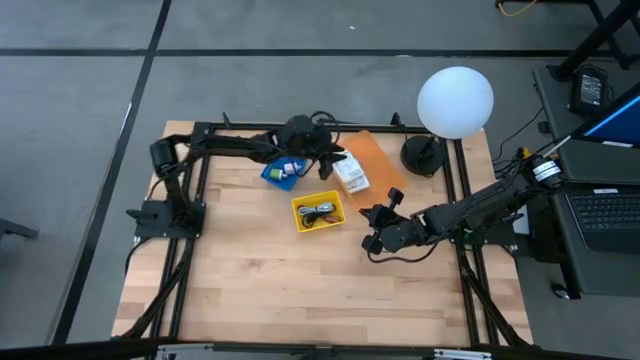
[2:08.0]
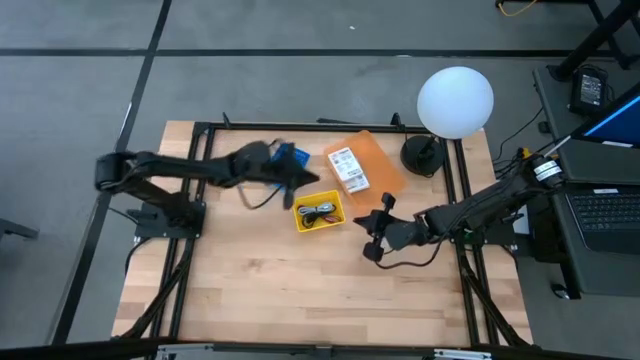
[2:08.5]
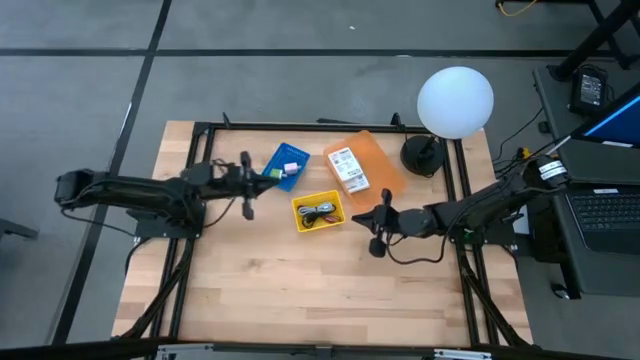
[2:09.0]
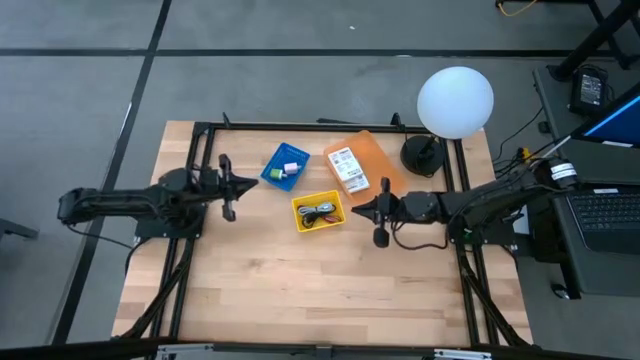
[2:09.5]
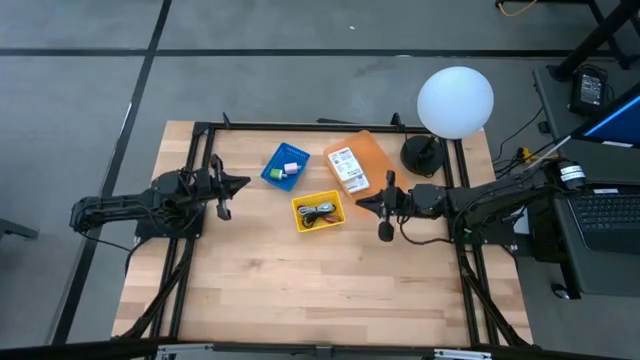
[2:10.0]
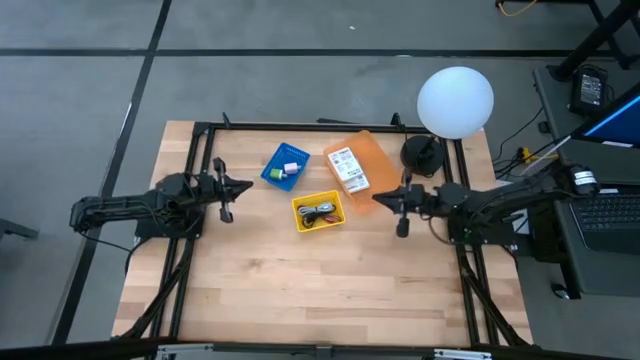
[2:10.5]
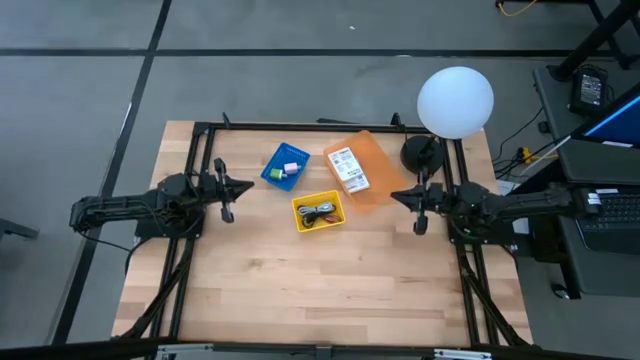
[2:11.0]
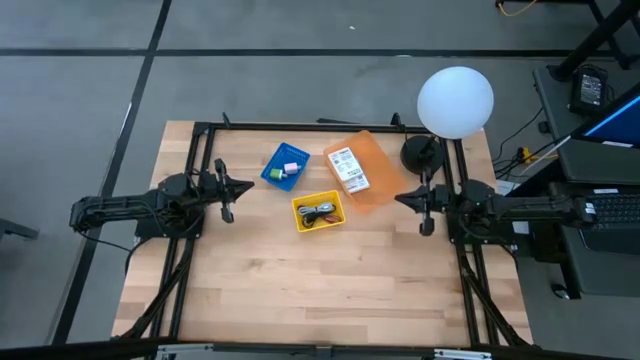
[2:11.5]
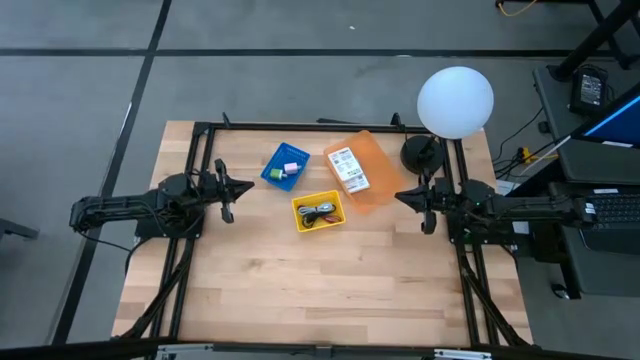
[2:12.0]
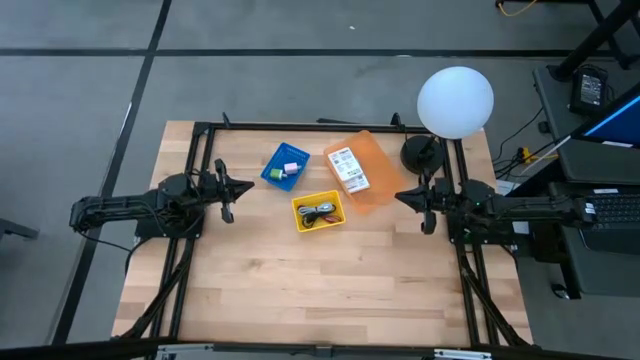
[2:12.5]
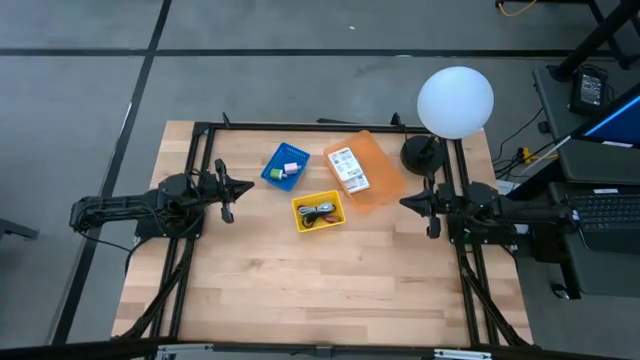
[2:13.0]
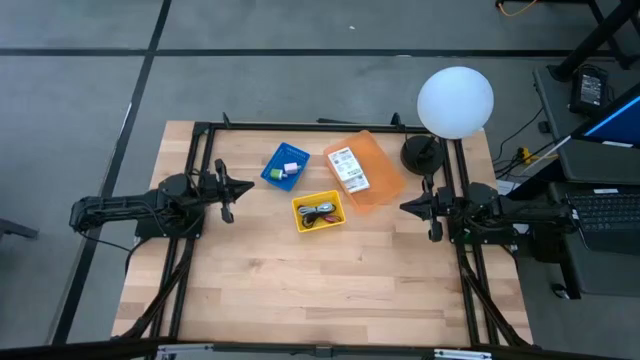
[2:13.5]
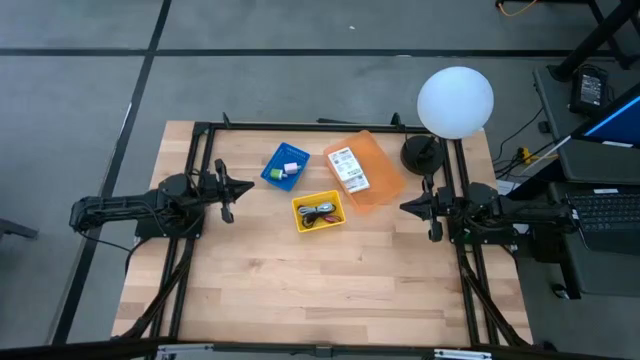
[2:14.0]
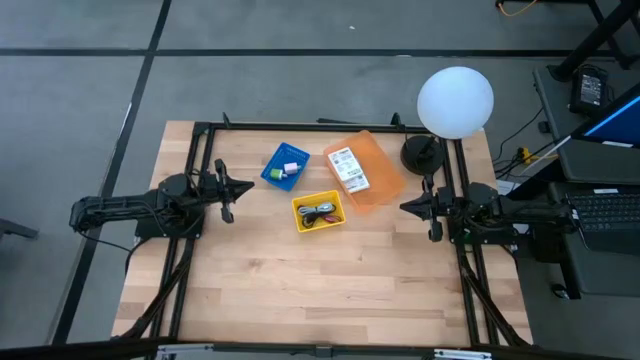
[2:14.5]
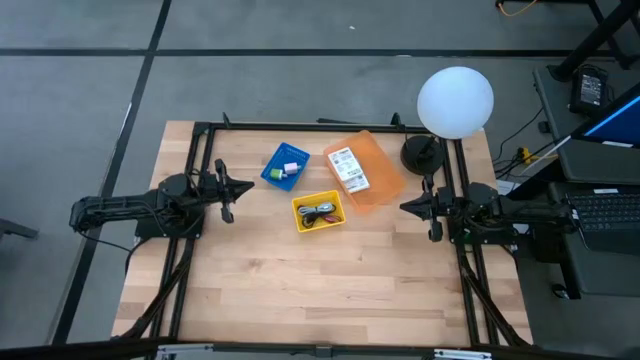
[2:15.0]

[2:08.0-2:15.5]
Task: Pick and place items into bin
Return to Home Position

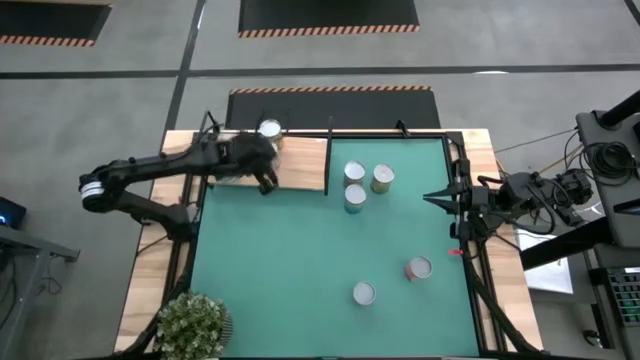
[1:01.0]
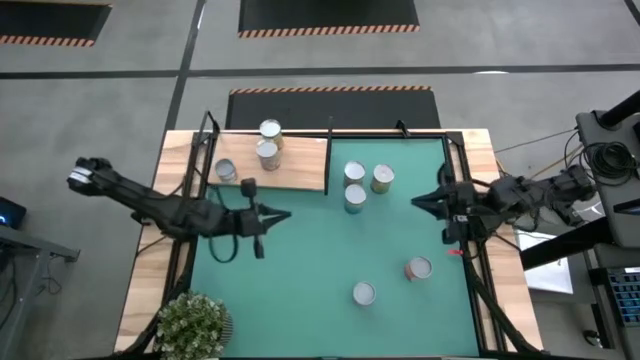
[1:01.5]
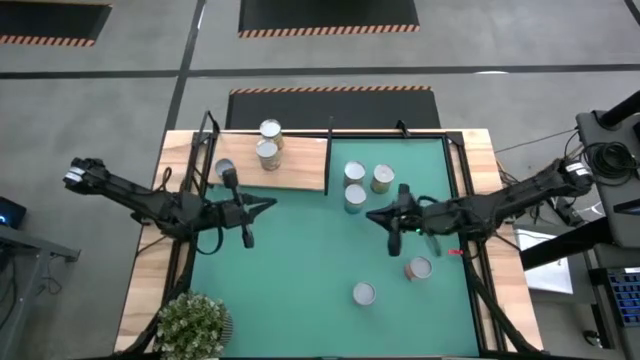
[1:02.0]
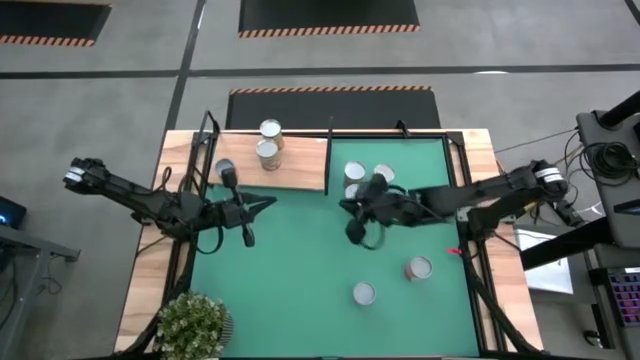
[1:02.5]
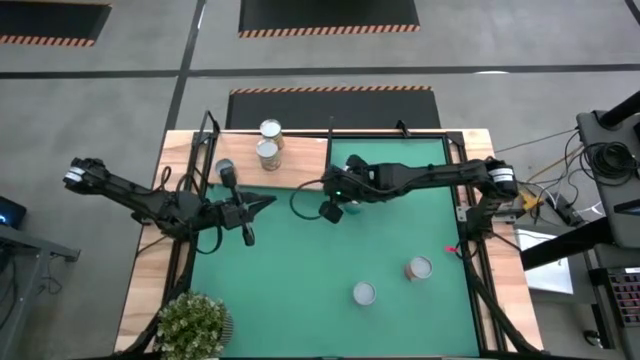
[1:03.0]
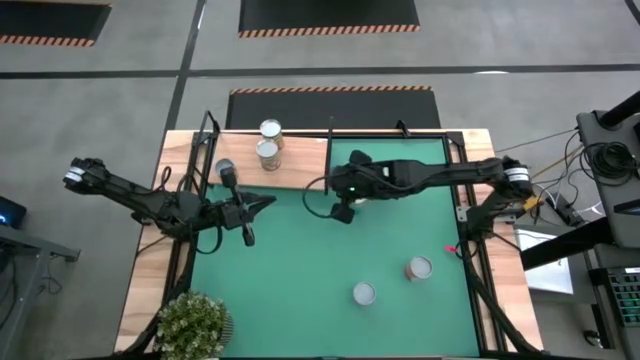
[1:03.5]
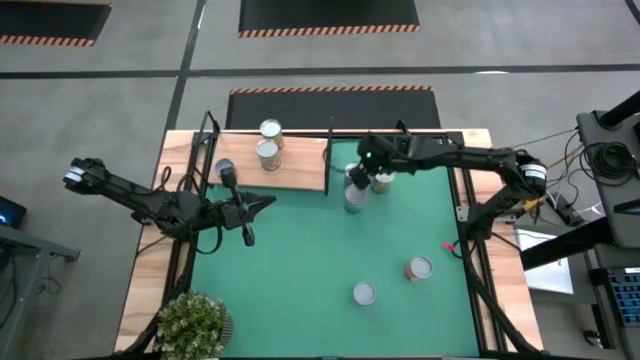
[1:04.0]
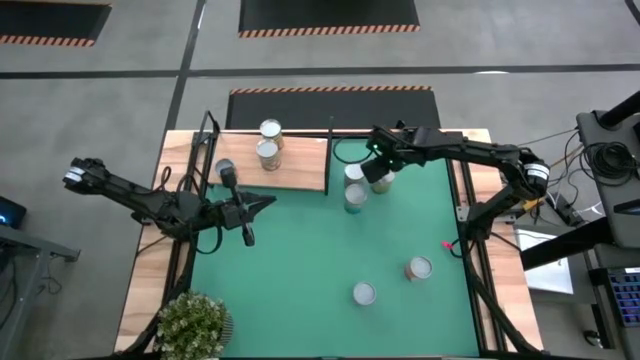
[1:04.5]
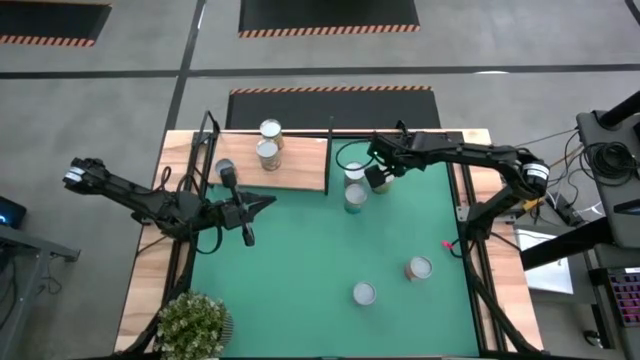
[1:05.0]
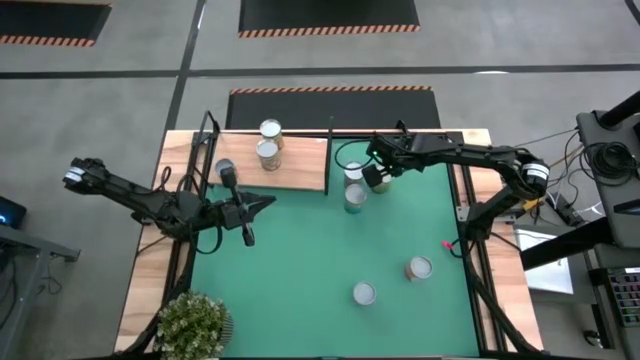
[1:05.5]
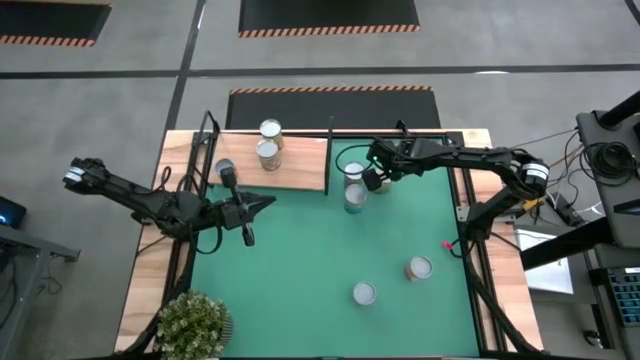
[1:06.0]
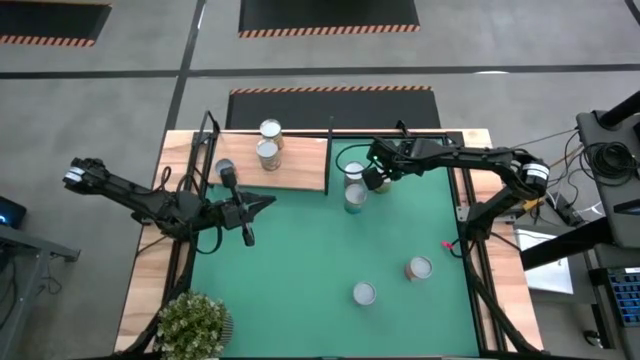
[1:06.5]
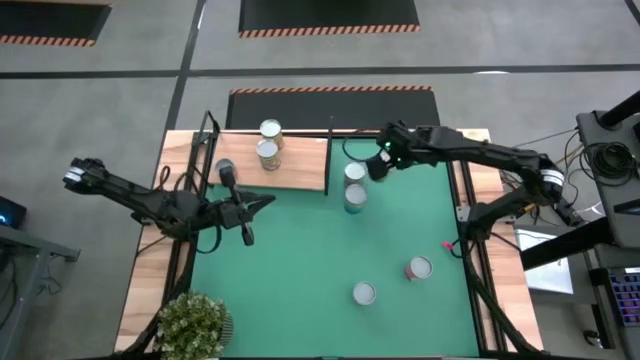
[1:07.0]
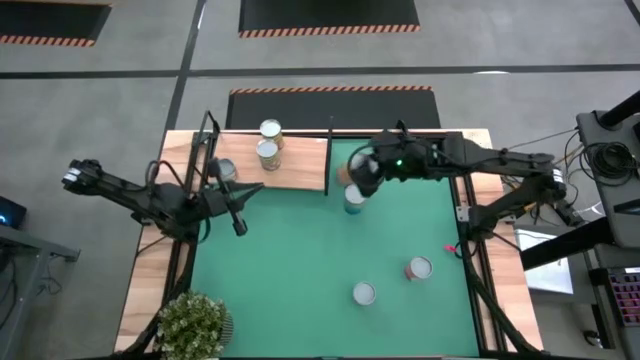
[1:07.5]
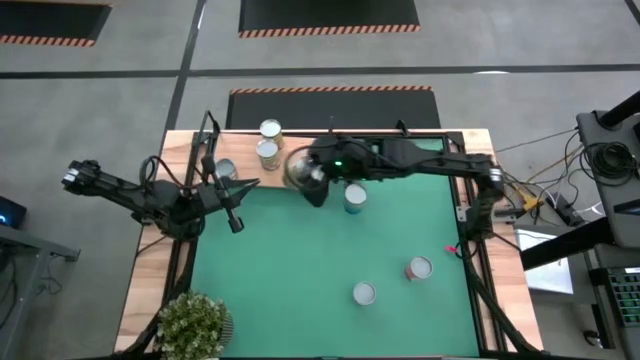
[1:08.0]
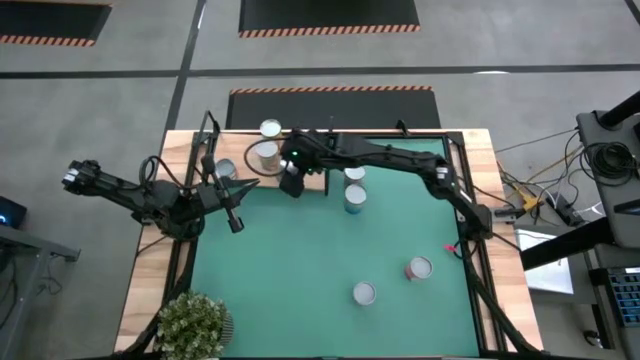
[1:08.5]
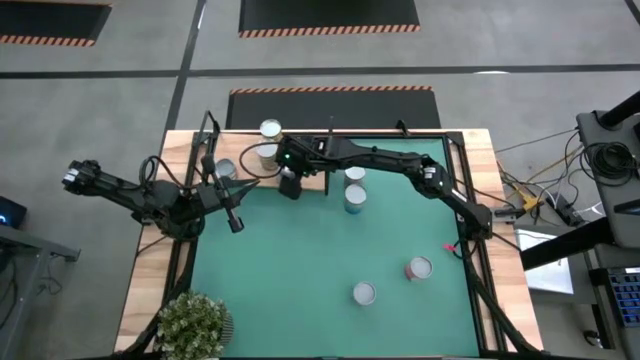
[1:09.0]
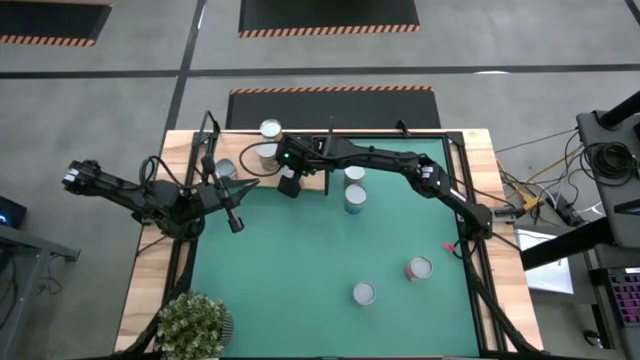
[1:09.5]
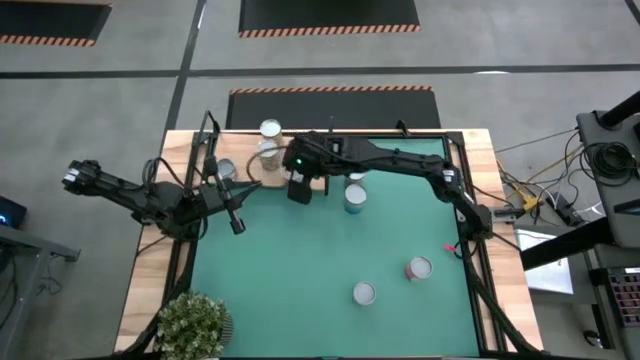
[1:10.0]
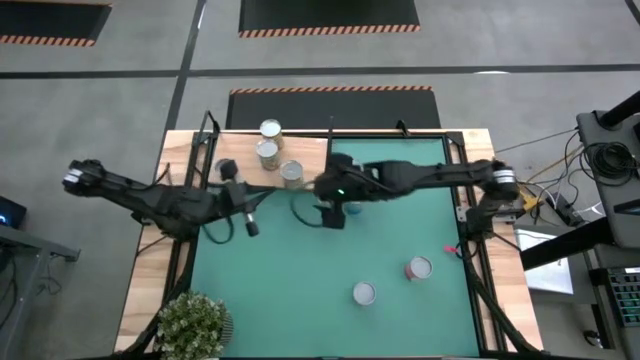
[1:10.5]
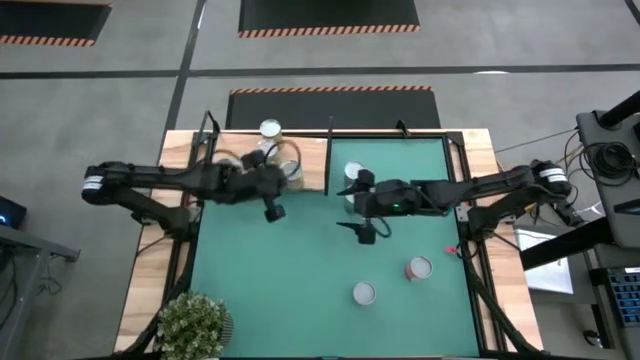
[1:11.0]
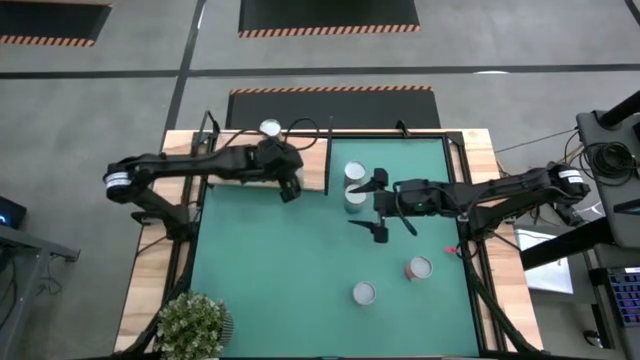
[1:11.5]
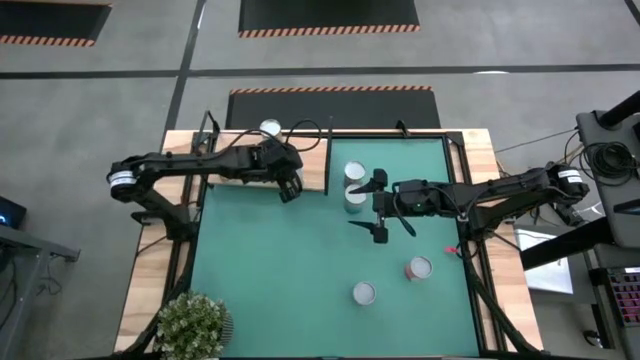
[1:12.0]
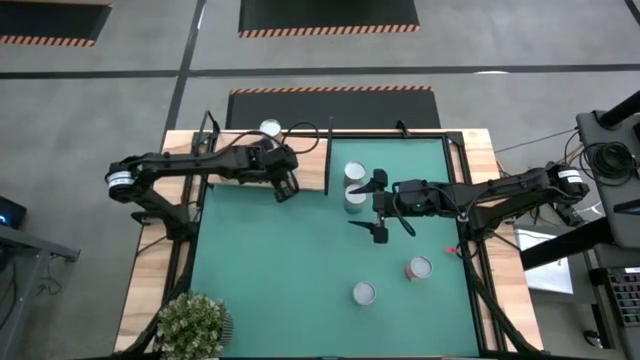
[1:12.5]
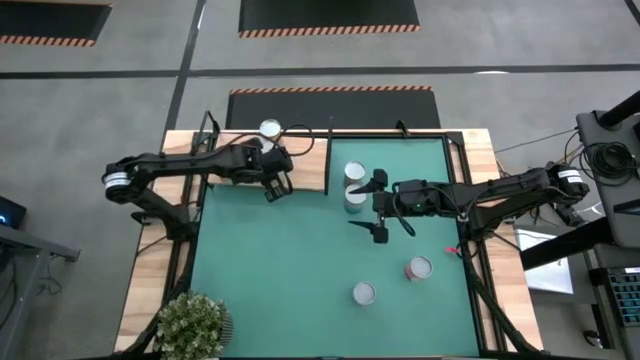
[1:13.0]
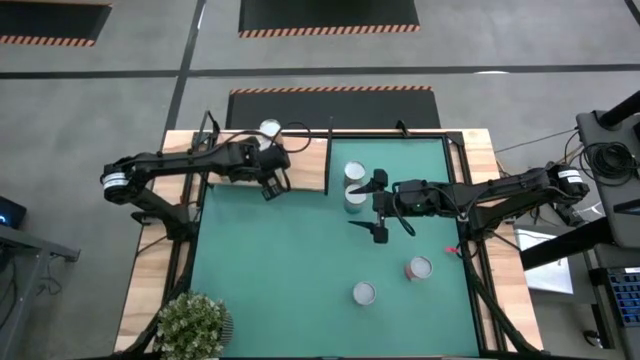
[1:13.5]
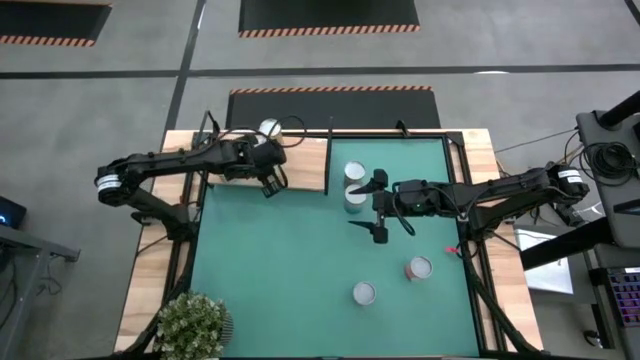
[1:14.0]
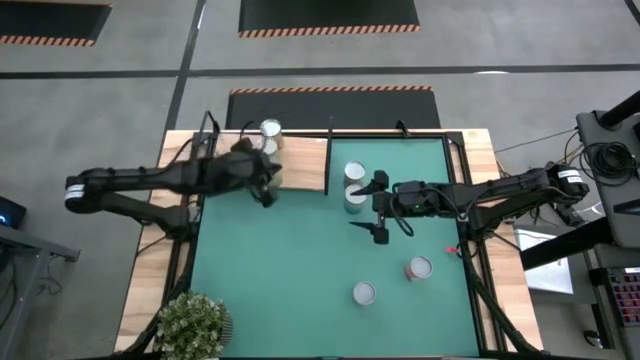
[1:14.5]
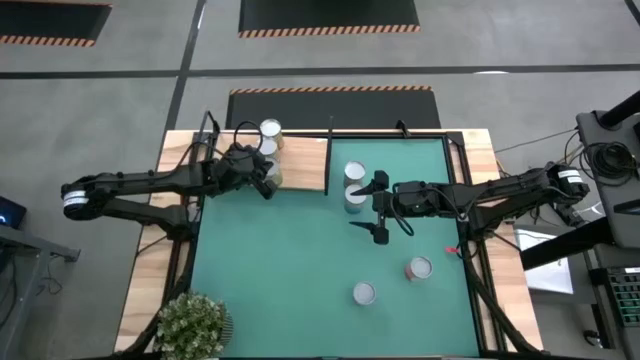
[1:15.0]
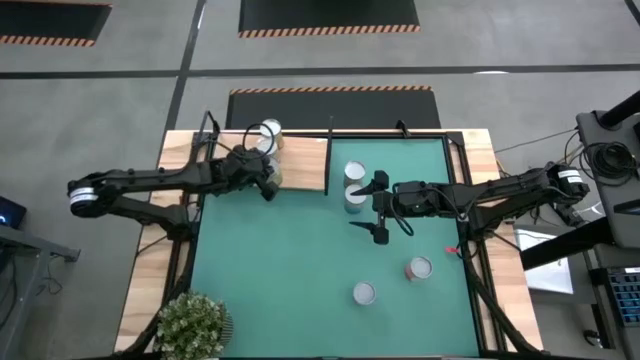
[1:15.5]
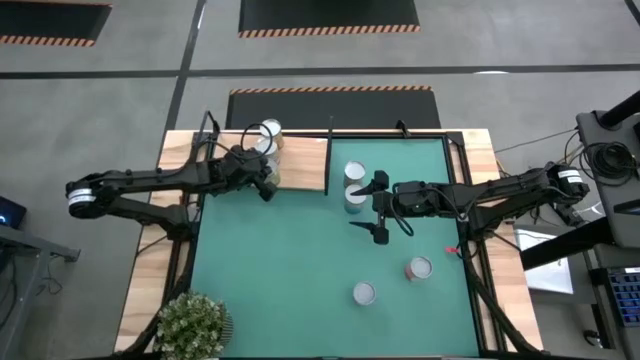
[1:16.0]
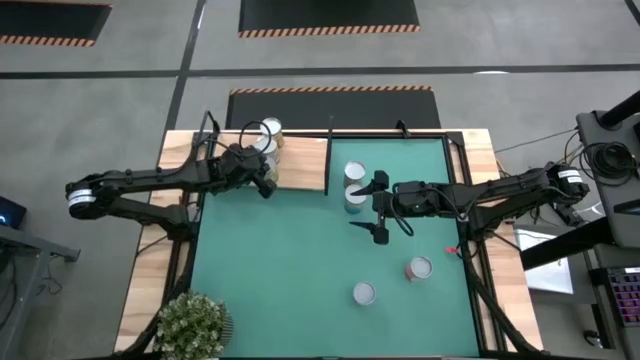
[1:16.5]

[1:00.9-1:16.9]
Task: Pick and place cans onto a shelf
Put the large canned oranges on the shelf
